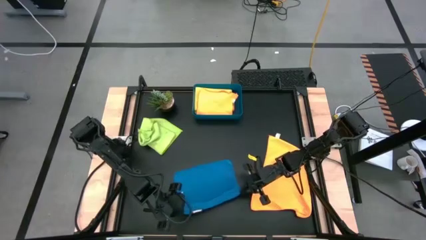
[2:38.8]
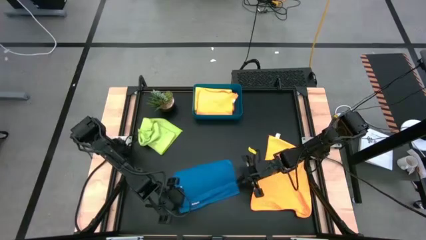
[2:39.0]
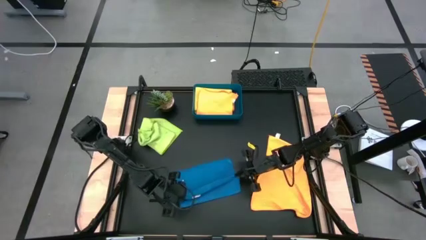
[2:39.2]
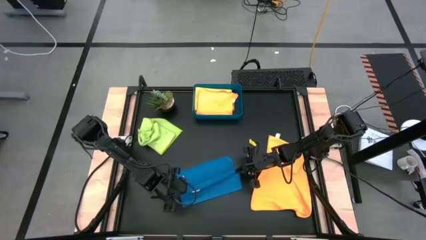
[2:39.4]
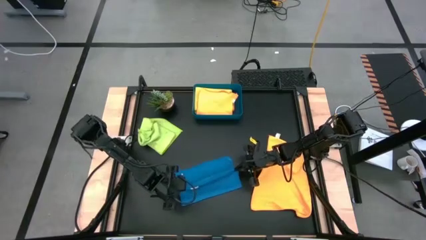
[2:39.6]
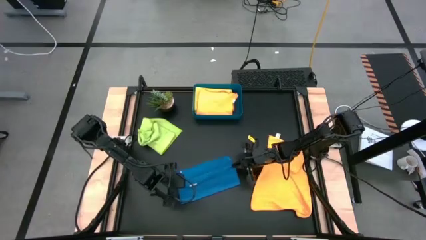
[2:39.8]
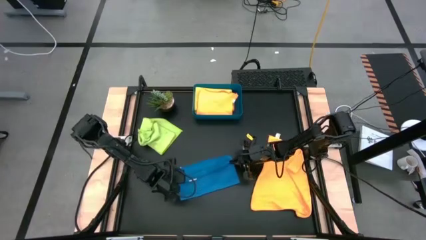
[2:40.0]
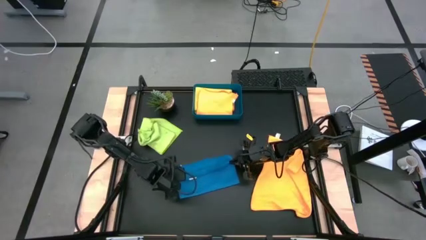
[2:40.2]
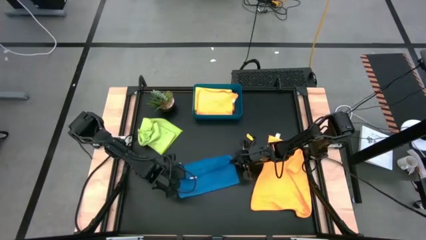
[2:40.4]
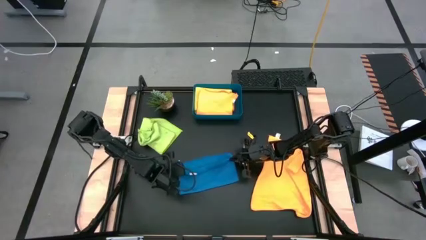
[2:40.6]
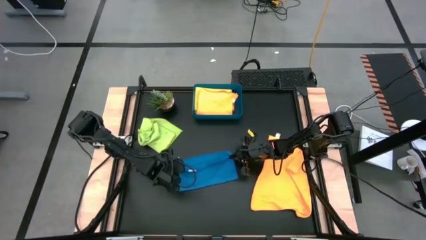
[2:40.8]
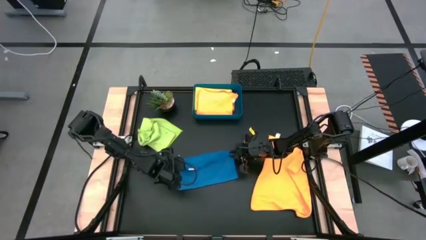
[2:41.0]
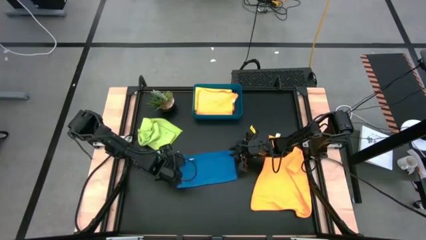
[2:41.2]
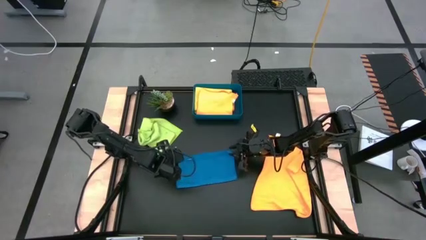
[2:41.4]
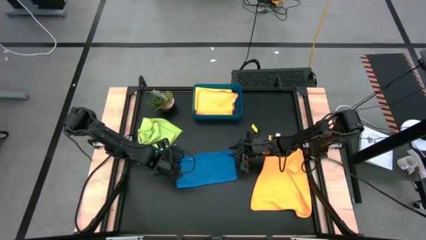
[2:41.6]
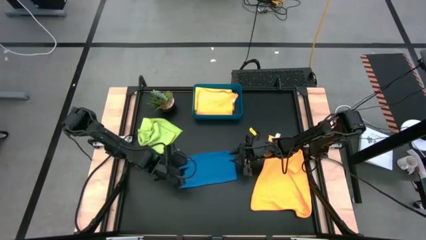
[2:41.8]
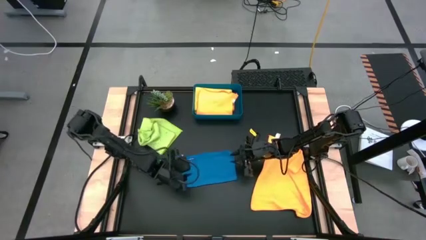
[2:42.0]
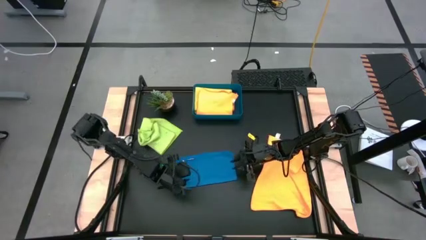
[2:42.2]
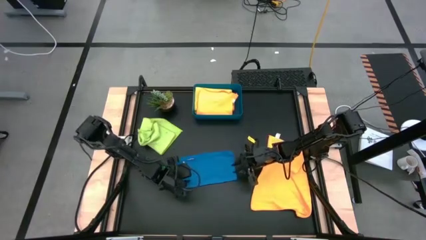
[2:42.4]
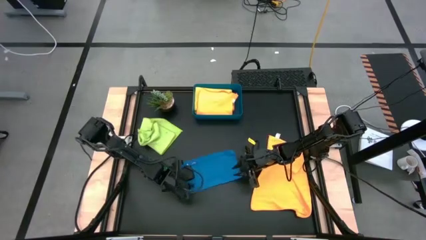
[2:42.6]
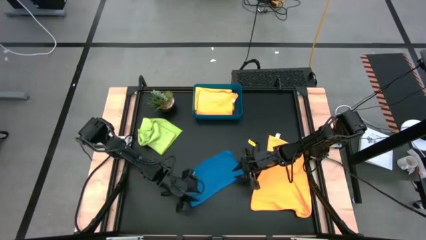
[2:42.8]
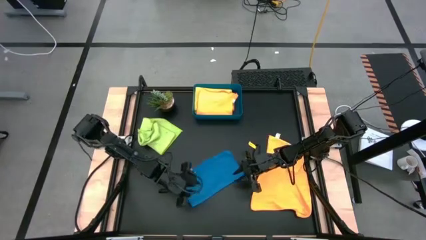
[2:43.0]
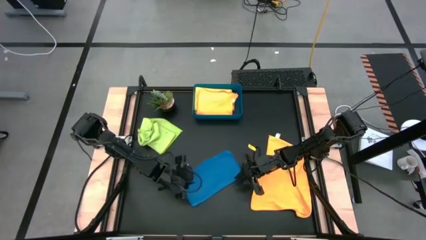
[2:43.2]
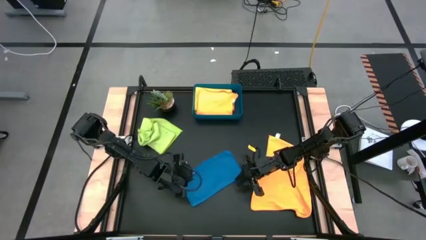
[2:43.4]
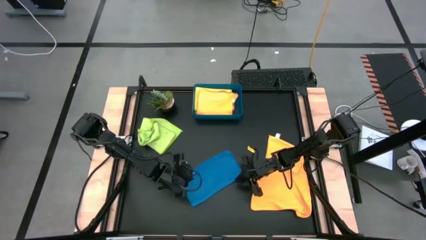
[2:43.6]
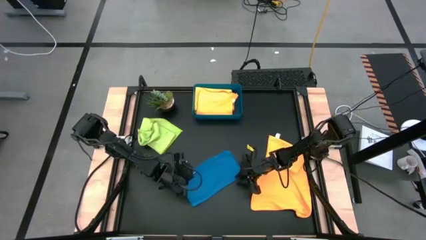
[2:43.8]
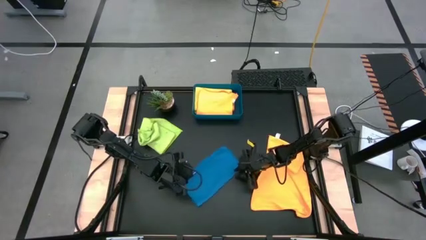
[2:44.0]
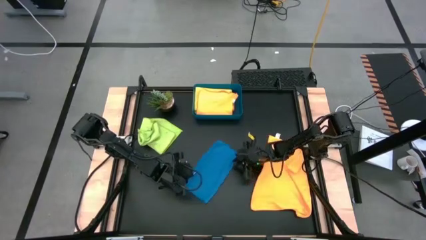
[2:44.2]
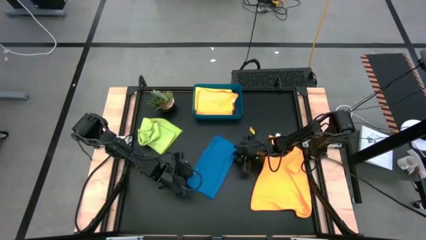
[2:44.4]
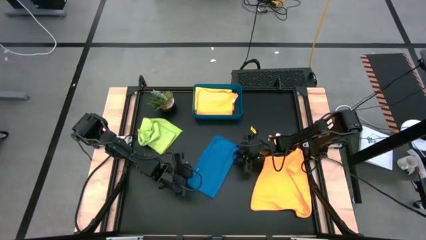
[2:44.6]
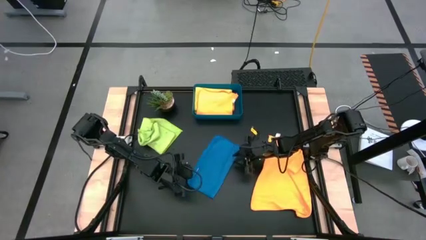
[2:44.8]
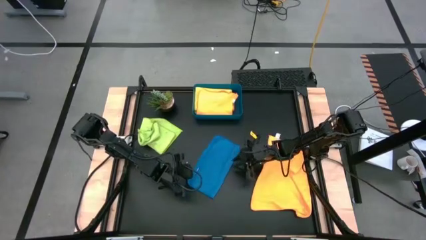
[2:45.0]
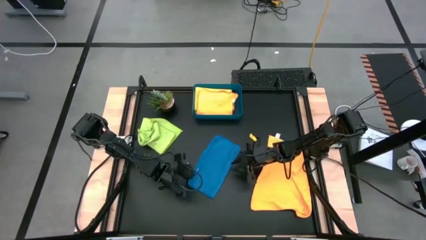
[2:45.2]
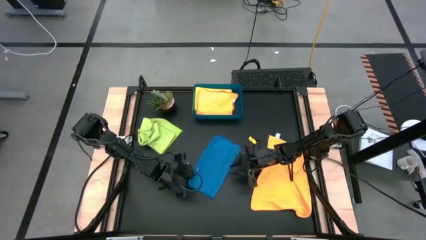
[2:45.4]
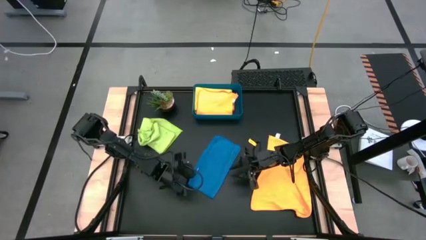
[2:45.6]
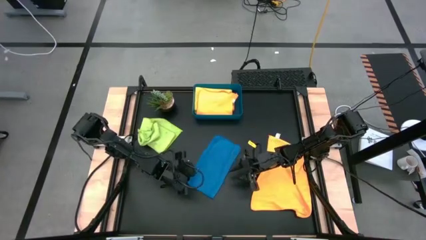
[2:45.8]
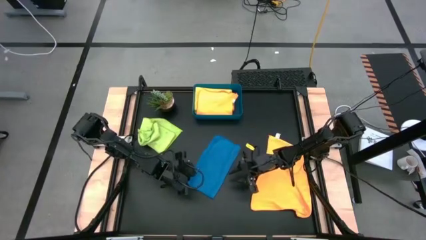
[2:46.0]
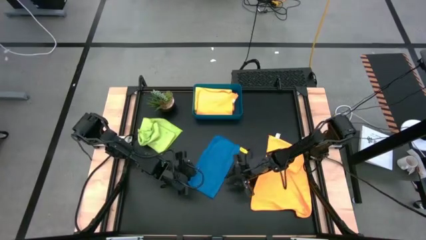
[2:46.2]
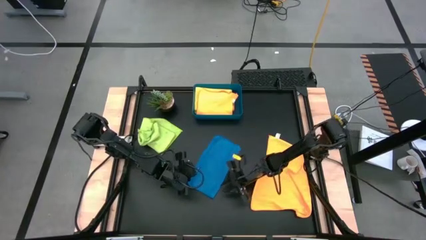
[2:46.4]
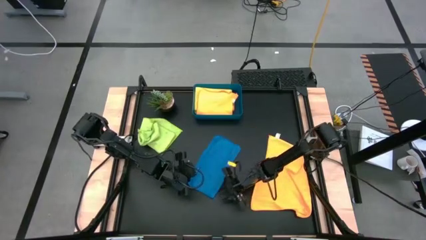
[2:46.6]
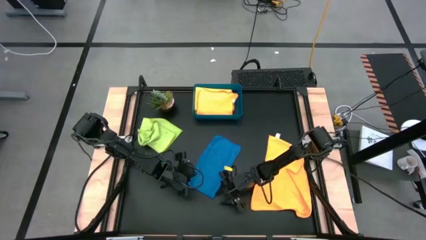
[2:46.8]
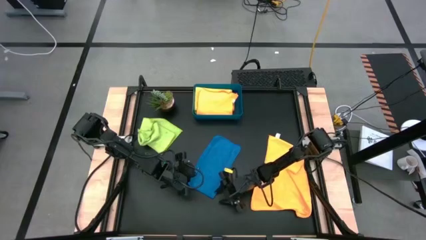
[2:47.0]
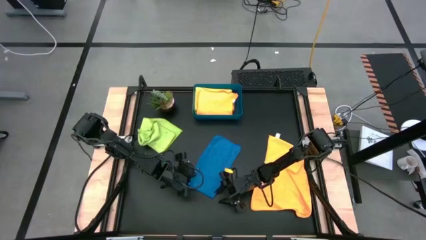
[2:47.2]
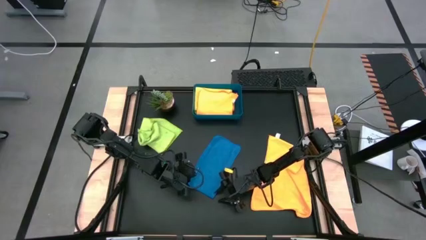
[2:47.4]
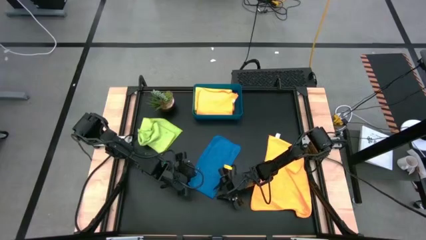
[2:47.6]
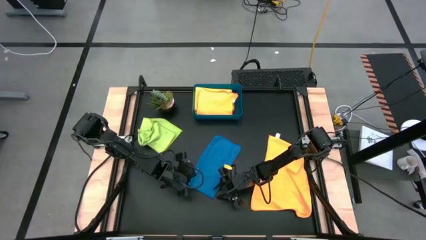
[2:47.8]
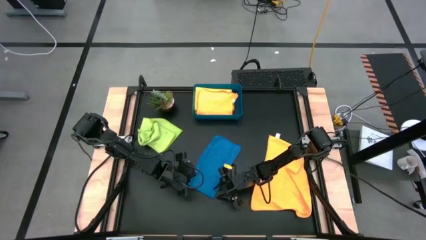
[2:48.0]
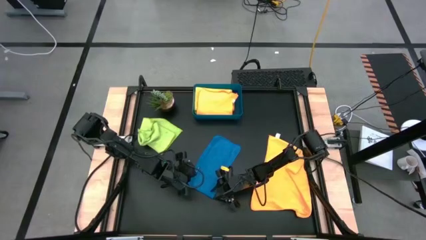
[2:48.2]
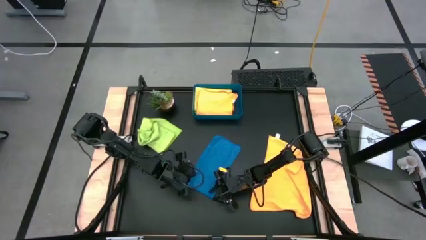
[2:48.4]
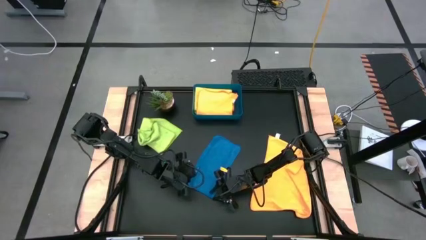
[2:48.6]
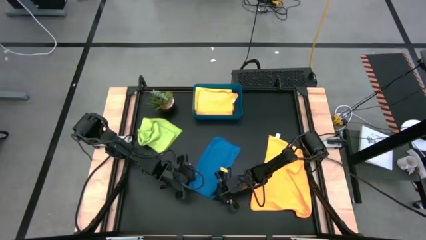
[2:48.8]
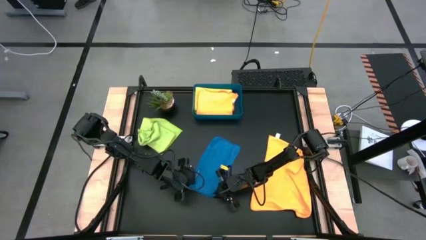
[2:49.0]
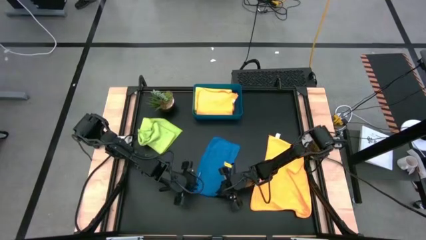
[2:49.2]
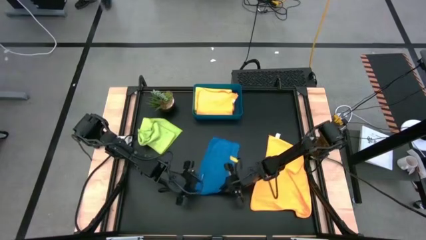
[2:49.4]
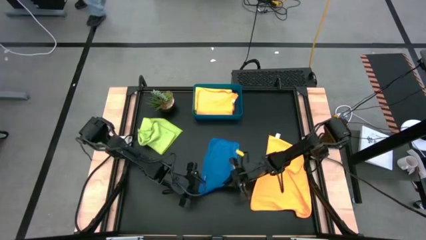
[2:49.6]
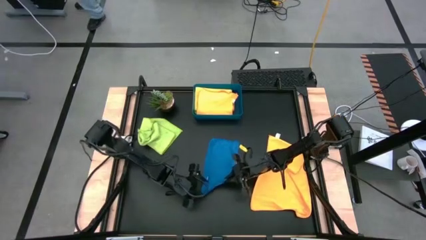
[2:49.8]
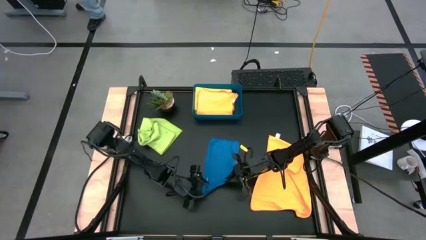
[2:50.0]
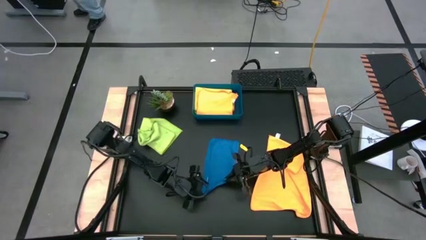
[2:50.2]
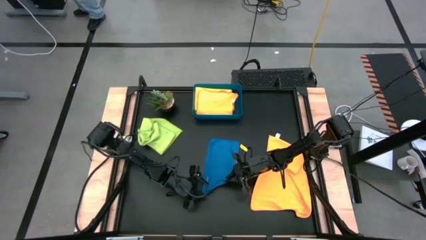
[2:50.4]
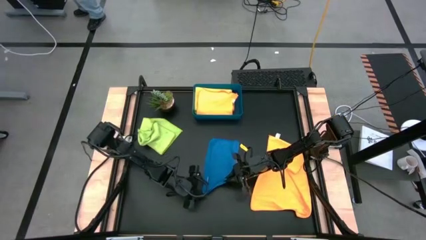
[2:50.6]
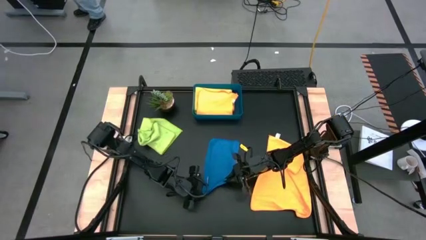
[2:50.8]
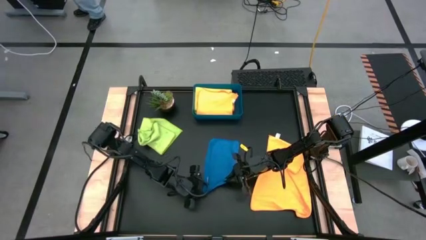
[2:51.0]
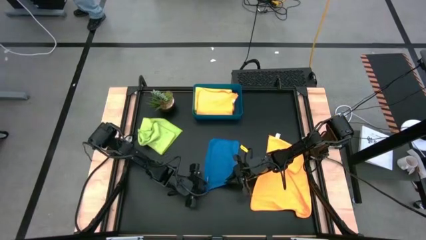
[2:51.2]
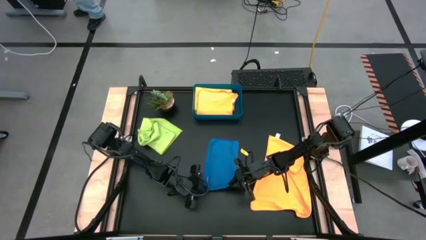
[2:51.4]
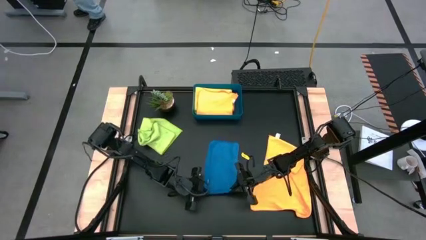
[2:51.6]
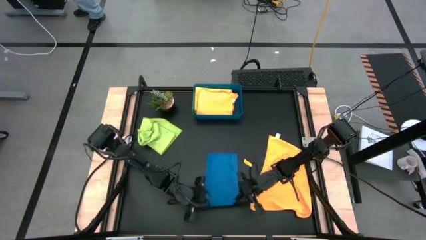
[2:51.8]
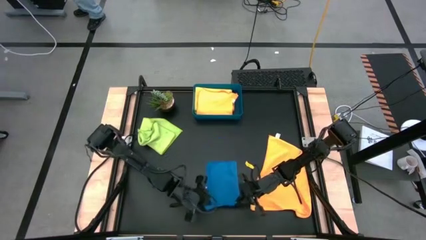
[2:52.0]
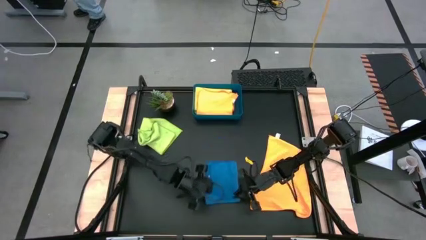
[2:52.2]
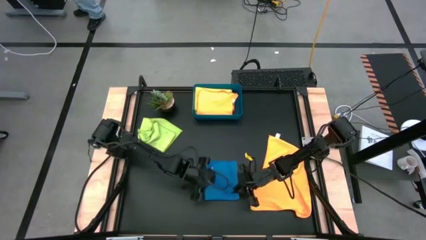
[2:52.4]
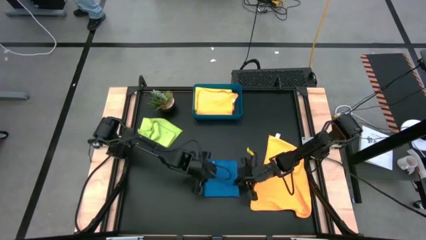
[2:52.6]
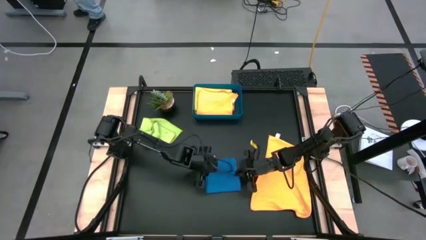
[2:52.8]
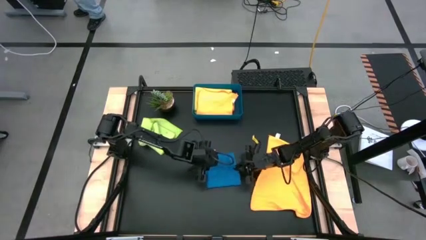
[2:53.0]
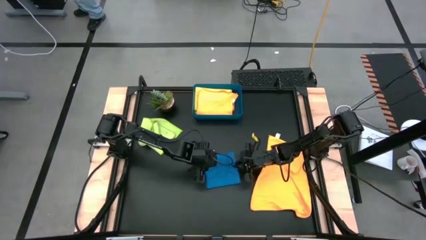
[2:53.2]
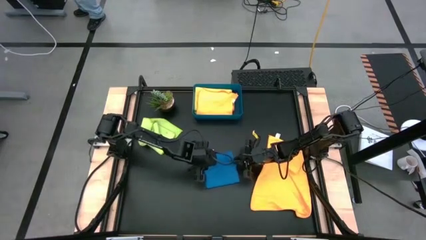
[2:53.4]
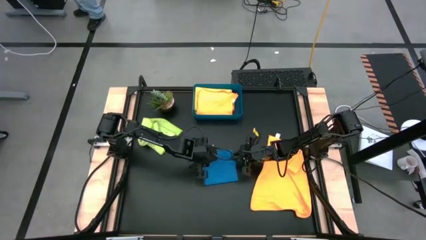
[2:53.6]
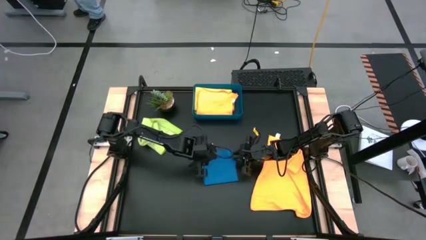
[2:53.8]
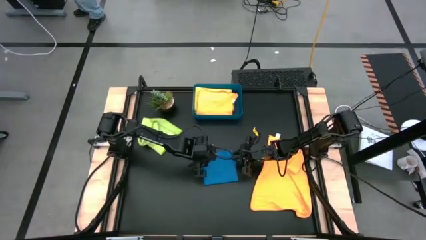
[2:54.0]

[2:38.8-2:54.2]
Task: Fold microfiber towels
Fold the blue microfiber cloth

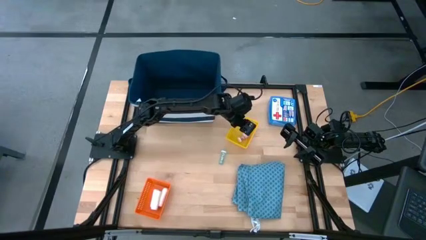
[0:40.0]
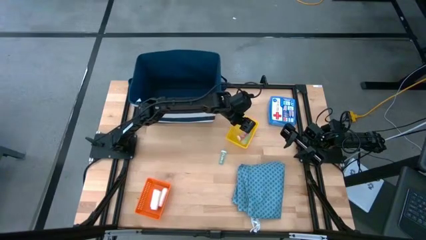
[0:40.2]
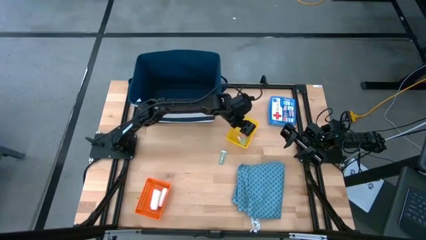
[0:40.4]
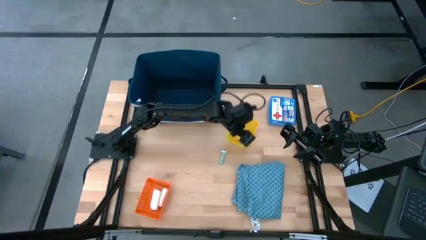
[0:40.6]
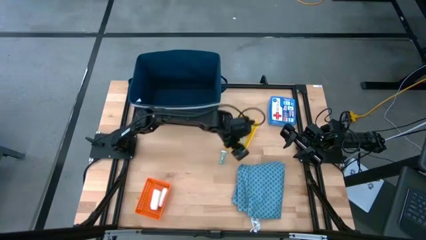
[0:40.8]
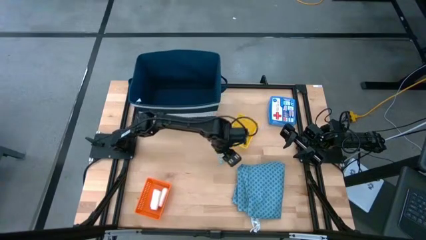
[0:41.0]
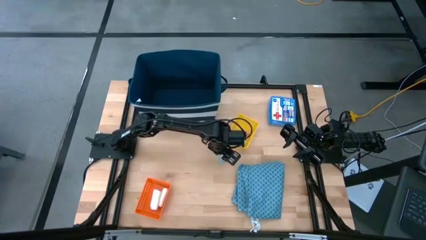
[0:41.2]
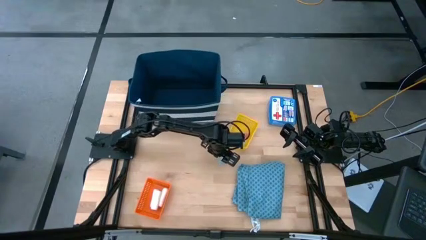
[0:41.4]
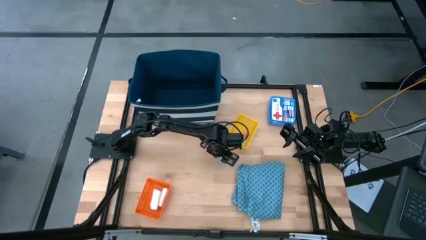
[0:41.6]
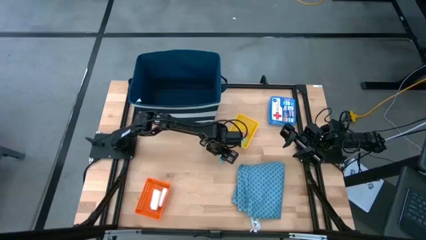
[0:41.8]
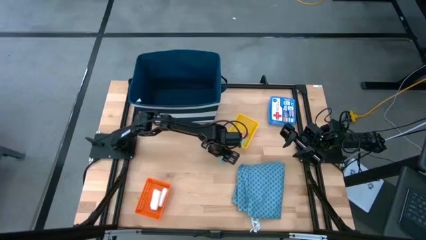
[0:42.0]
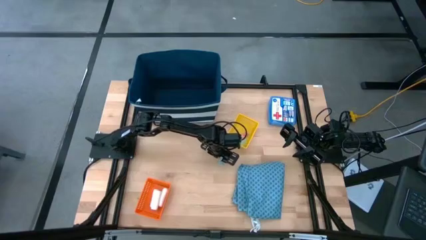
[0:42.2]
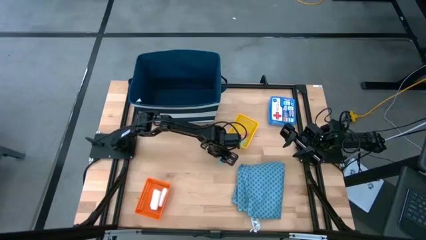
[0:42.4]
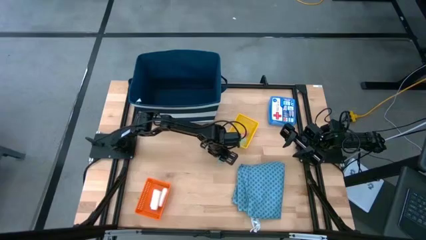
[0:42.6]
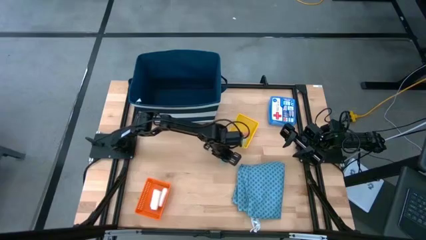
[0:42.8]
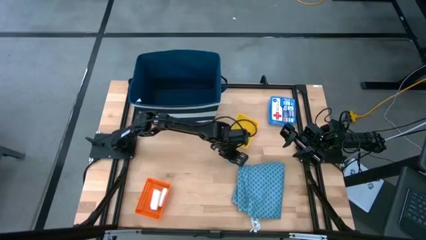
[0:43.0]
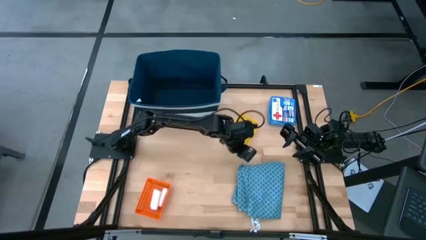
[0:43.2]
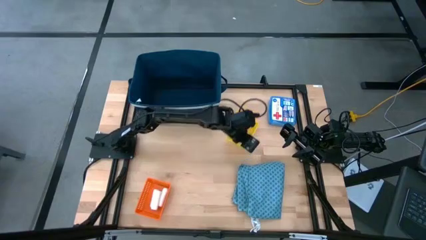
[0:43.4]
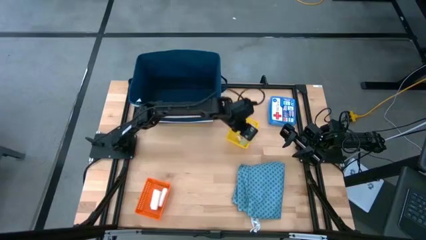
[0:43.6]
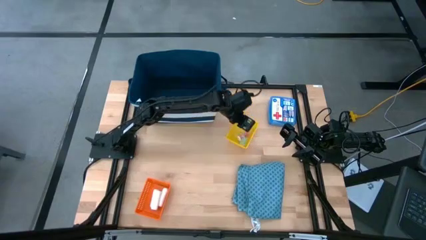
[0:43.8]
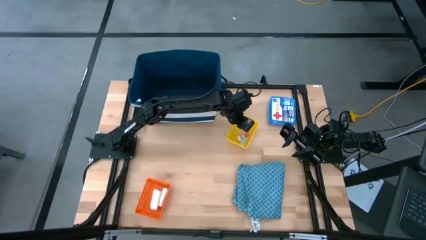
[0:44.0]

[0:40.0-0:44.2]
Task: Pick & place medical supplies in basket/bin
Put the blue bottle in the yellow bin
